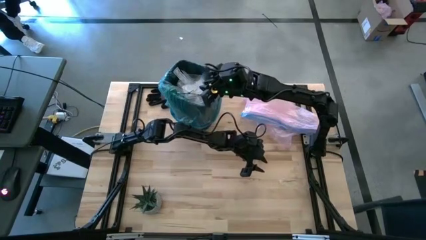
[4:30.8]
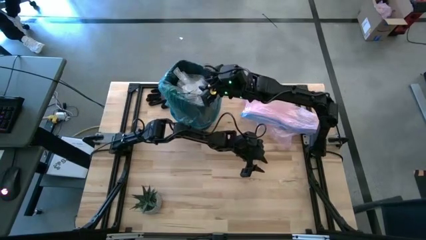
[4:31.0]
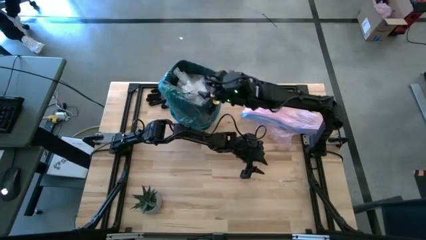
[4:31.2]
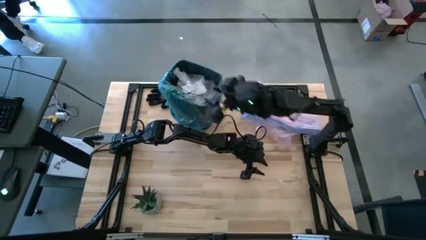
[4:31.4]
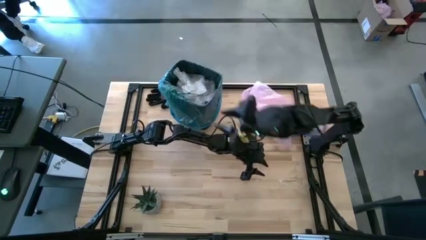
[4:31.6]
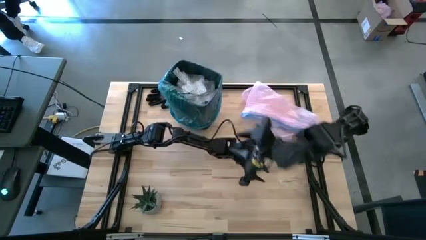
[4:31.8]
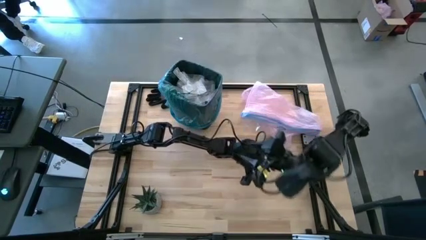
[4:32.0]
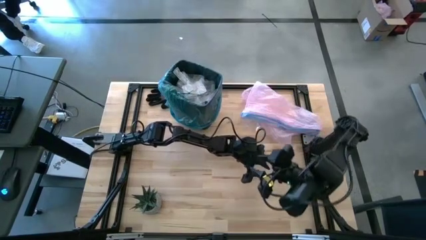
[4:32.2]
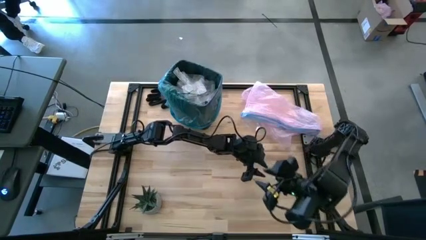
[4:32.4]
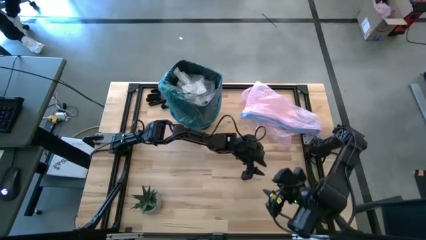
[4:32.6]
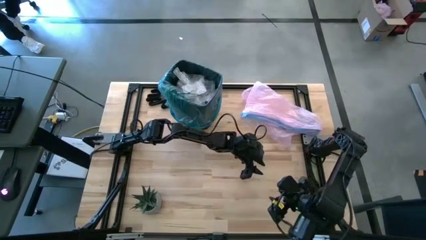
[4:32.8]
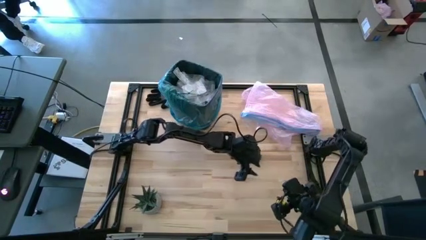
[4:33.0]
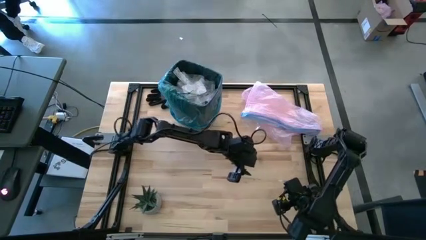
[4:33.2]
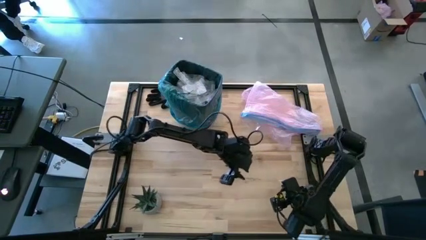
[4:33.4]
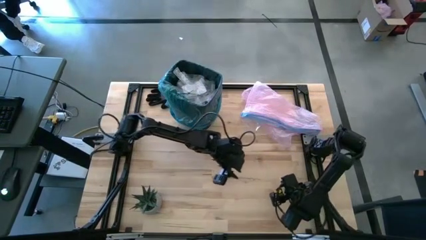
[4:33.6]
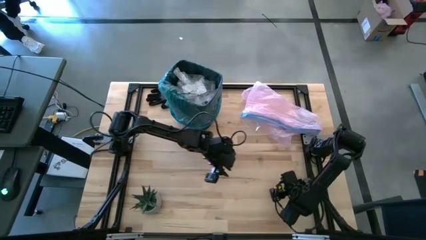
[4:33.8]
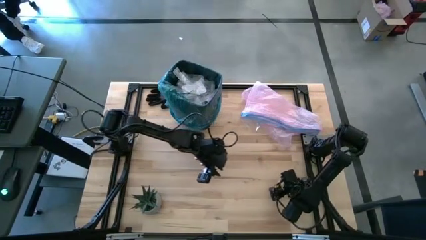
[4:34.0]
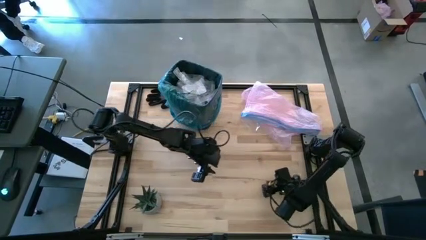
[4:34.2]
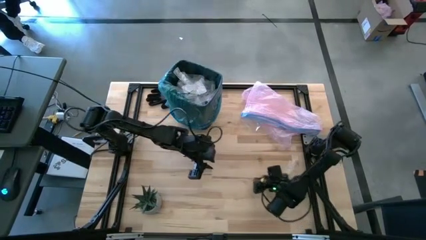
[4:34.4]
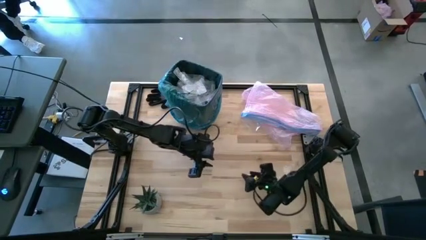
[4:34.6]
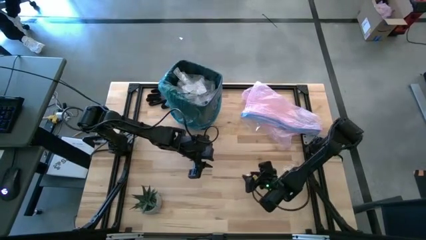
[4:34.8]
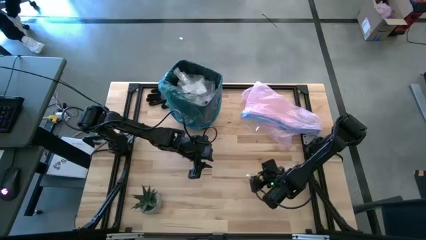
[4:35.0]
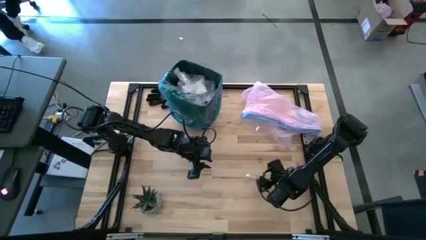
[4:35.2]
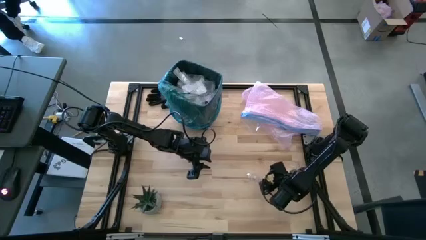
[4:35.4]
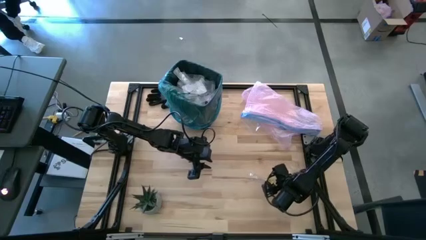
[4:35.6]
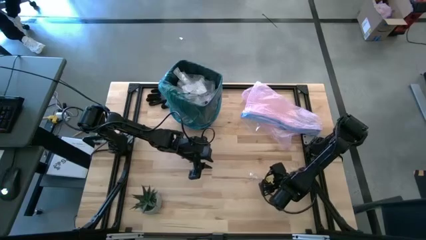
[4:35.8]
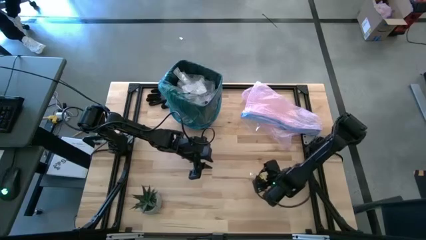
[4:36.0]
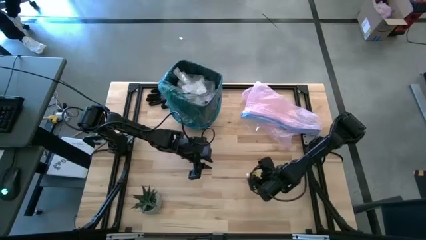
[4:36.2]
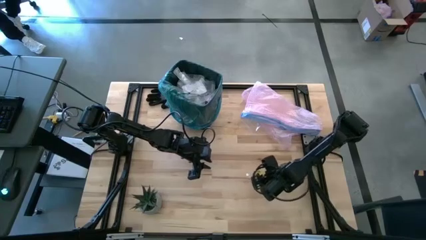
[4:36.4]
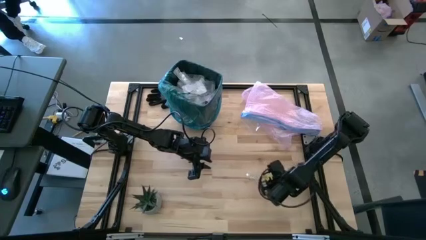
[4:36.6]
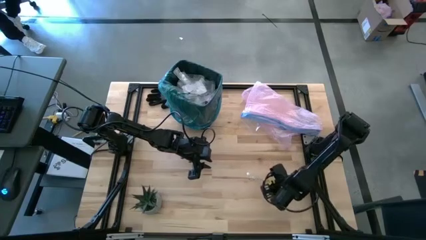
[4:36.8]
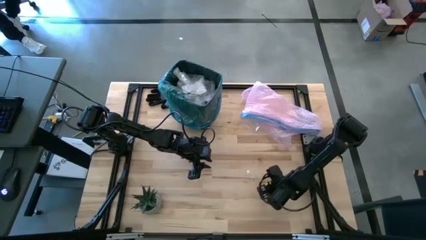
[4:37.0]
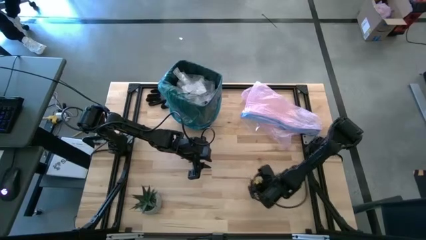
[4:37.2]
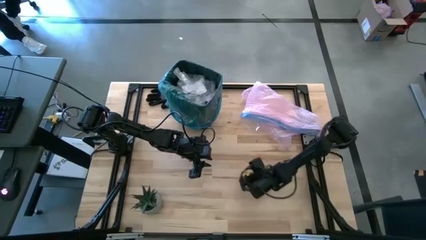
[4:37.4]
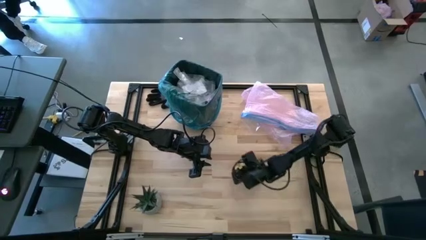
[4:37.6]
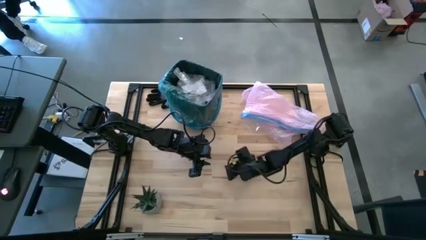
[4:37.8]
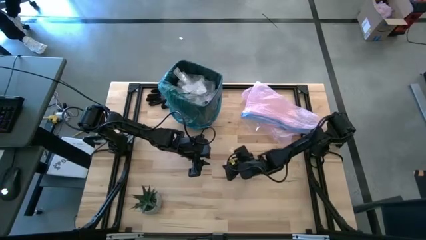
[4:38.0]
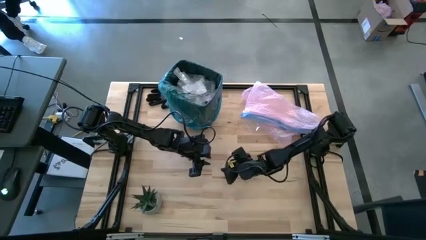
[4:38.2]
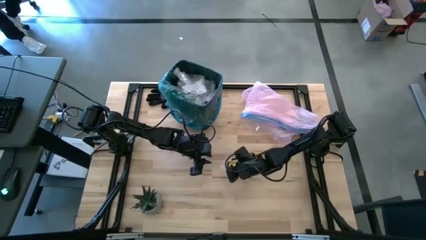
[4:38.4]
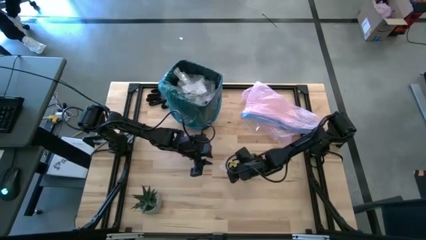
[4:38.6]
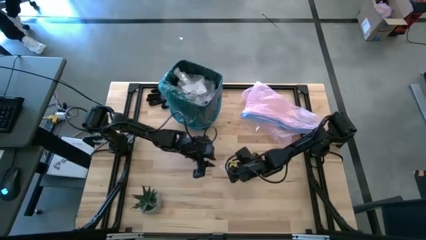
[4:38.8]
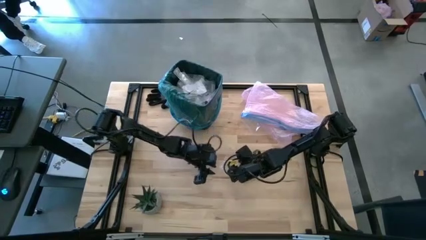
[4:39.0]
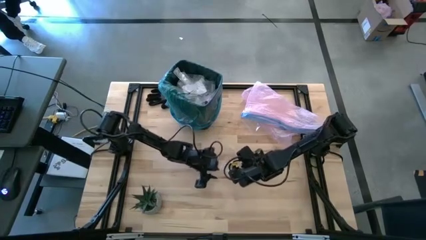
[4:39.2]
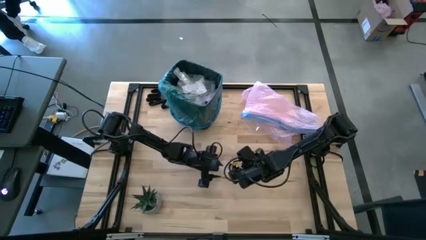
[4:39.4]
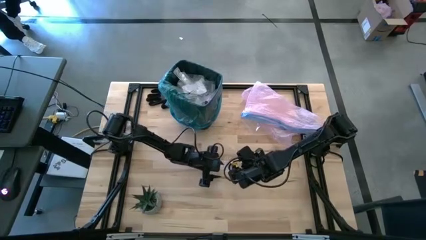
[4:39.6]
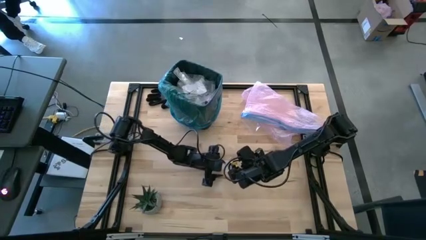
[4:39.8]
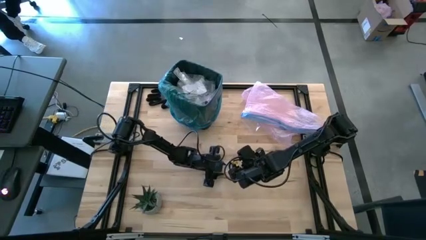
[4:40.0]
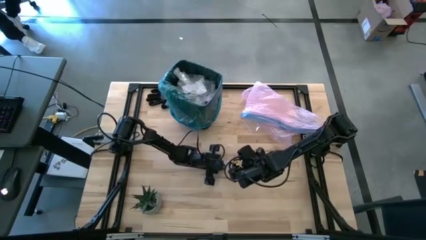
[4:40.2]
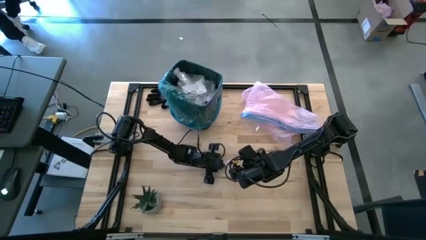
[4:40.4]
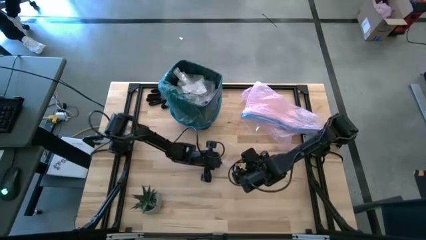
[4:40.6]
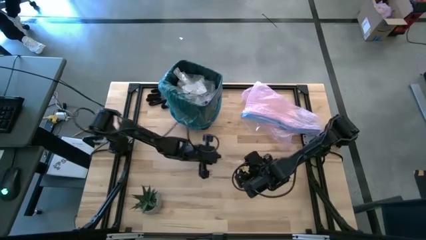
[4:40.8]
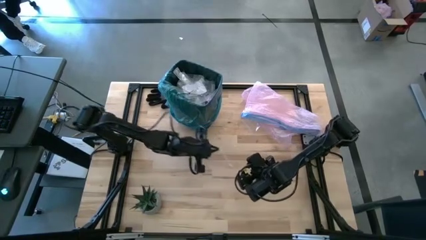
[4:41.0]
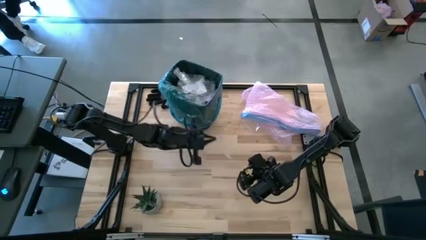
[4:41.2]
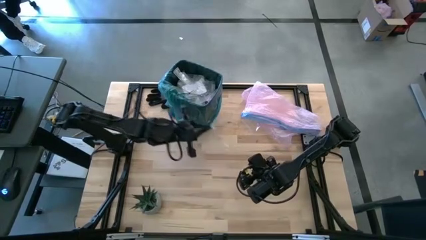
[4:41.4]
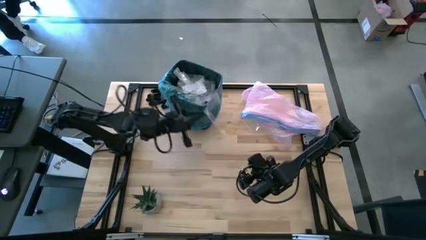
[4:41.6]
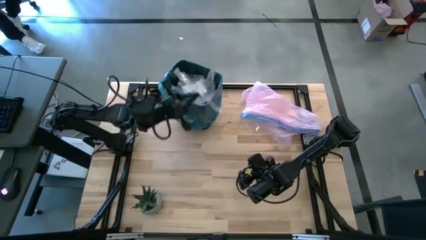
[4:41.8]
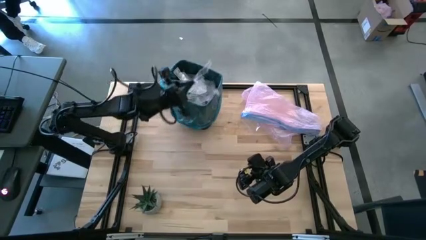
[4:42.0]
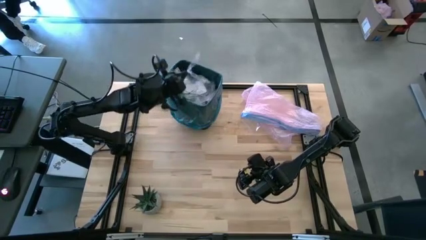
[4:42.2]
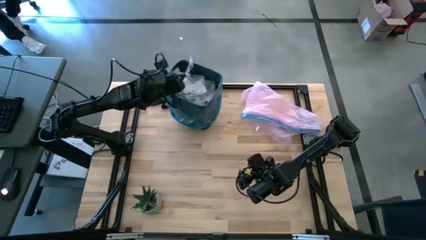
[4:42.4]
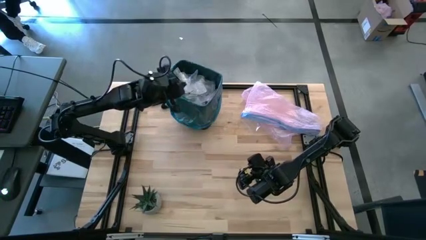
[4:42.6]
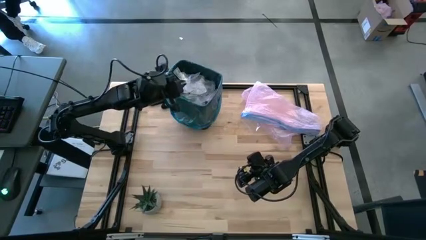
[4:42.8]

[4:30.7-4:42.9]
Task: place trash/remove bag and relplace
Put the clear plastic into the trash bin

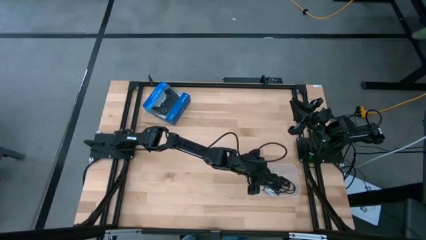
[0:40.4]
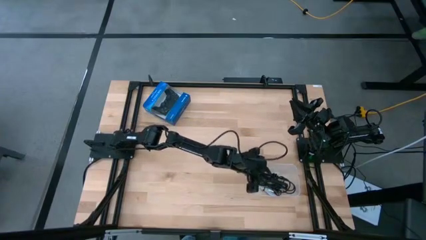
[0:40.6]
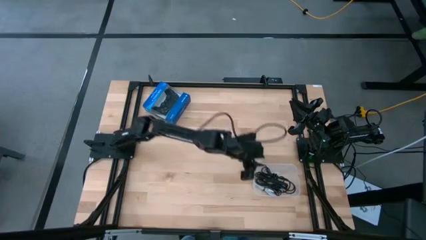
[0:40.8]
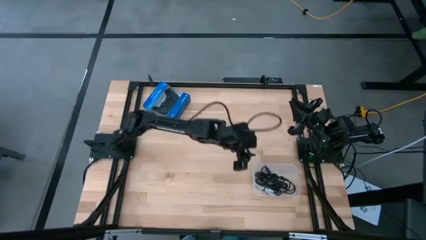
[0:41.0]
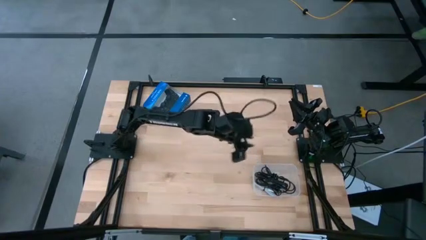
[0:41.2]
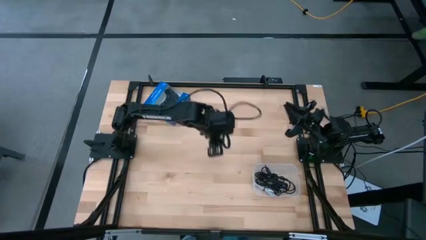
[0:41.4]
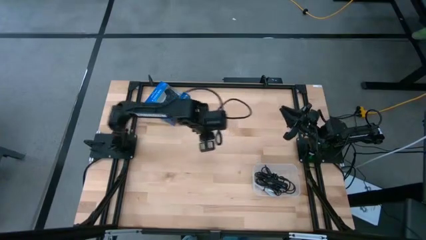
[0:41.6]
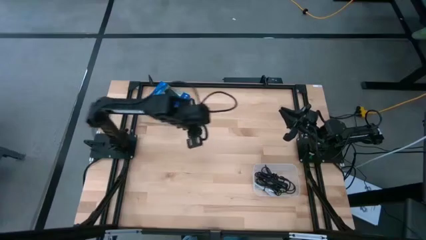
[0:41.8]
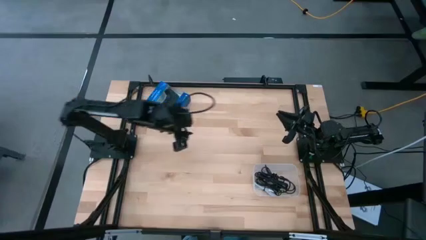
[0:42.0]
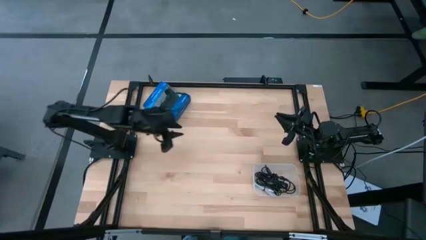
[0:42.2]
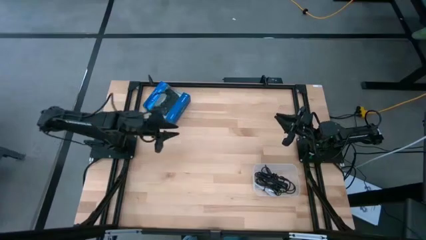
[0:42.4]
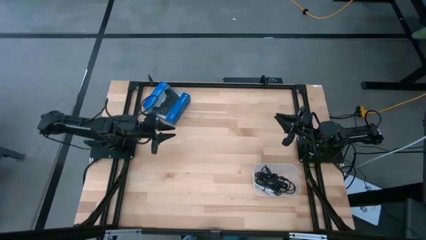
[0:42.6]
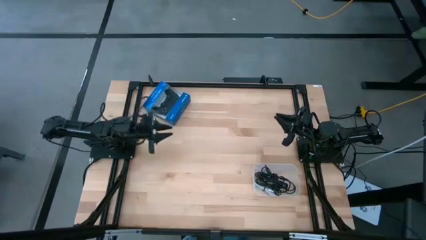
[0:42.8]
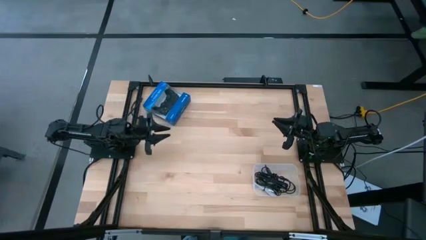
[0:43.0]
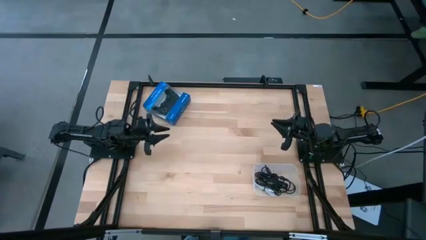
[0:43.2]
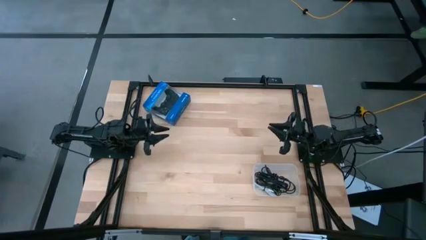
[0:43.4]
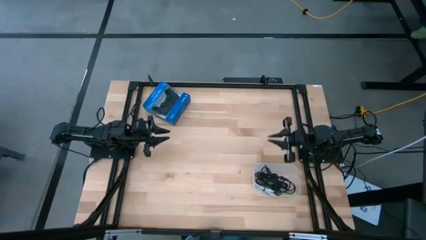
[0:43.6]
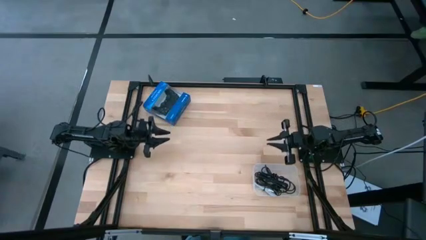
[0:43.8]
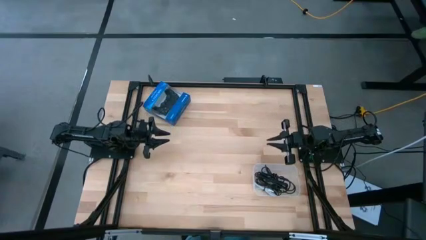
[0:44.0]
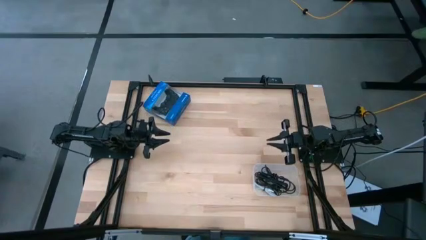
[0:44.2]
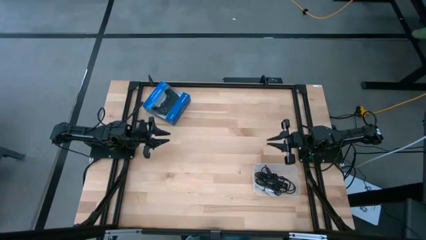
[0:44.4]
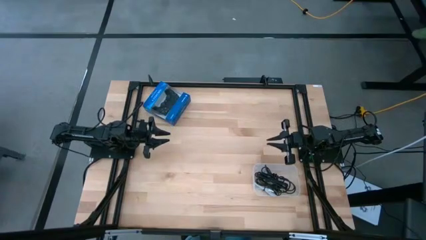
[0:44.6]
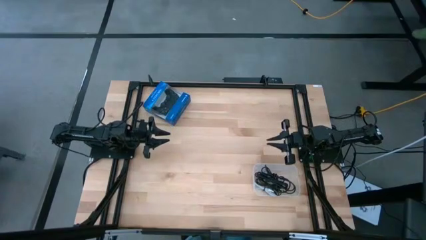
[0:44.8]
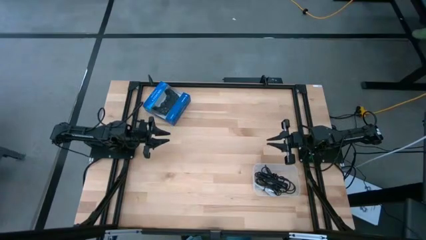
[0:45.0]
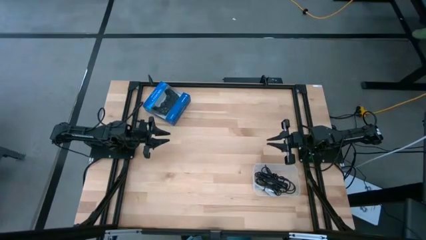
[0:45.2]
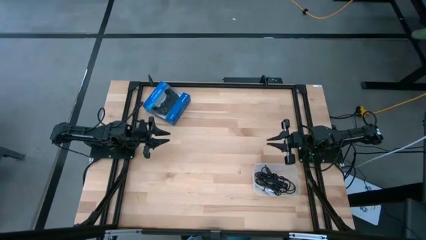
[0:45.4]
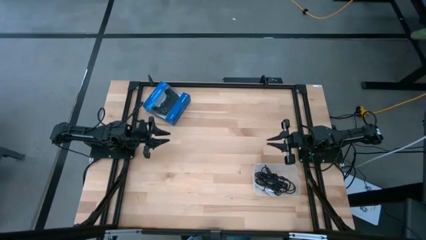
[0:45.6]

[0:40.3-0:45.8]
Task: Pick and place USB-C Cables
Return to Home Position
